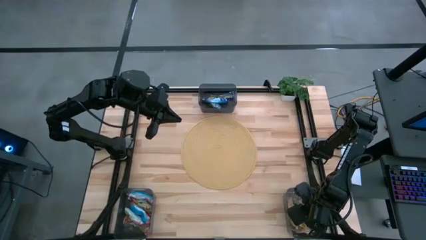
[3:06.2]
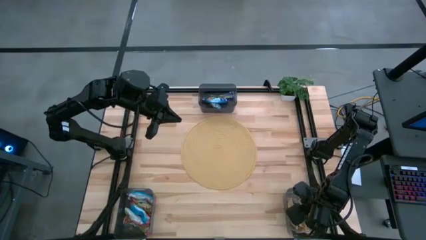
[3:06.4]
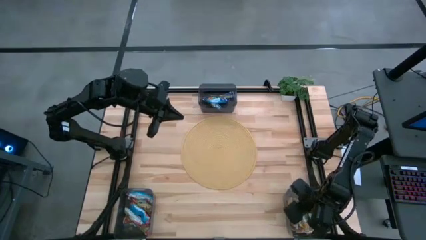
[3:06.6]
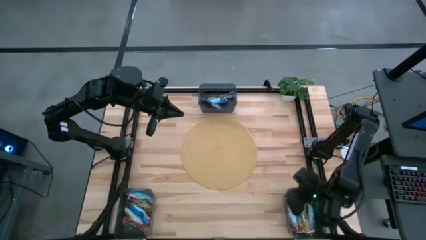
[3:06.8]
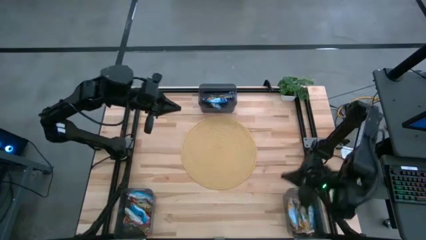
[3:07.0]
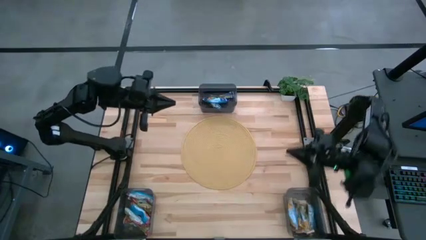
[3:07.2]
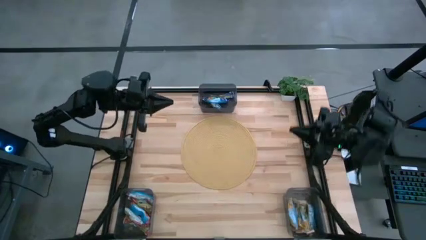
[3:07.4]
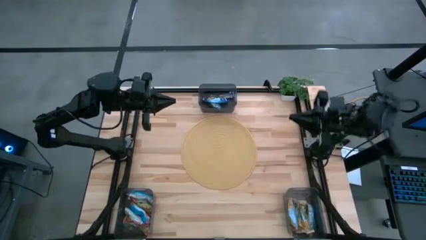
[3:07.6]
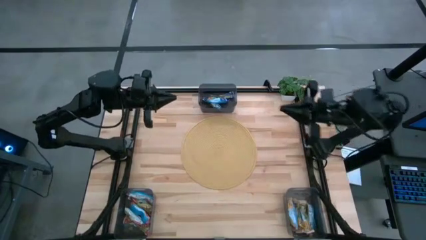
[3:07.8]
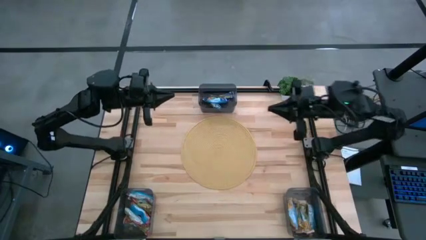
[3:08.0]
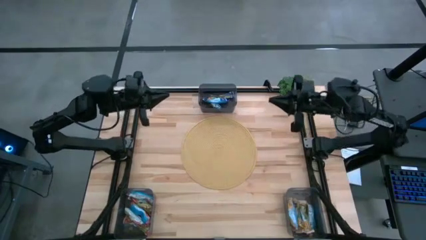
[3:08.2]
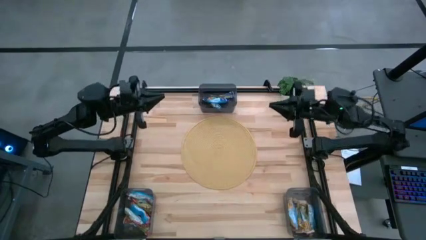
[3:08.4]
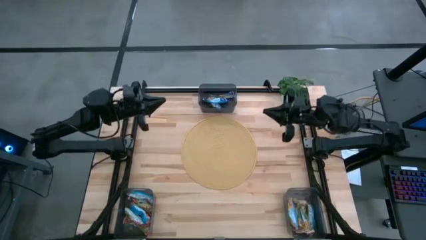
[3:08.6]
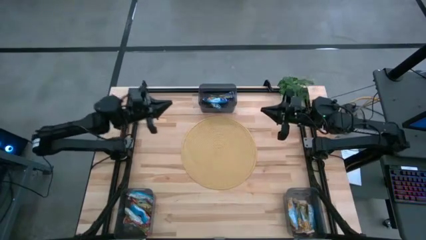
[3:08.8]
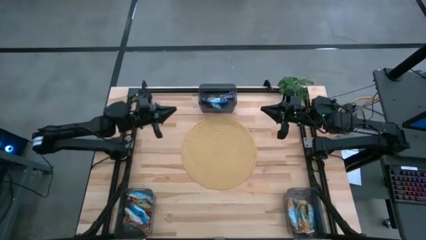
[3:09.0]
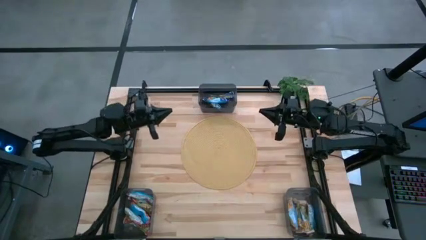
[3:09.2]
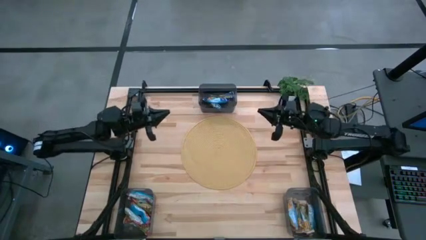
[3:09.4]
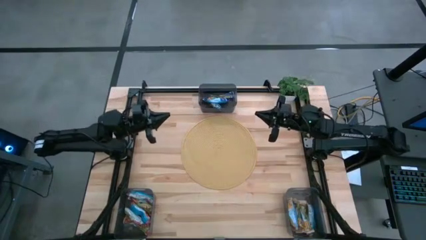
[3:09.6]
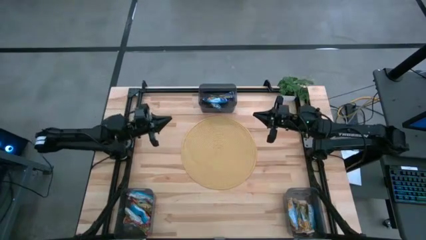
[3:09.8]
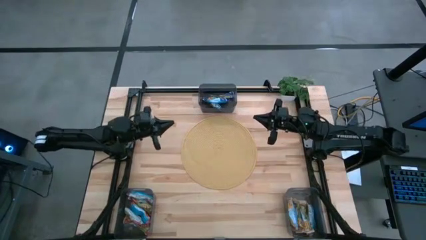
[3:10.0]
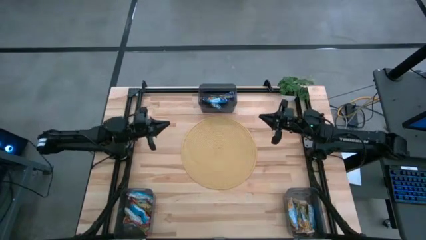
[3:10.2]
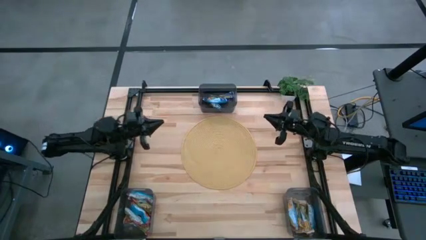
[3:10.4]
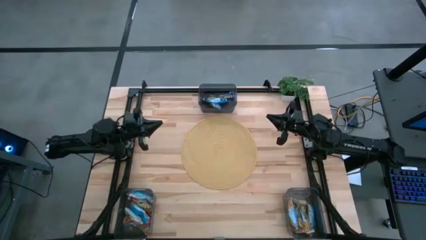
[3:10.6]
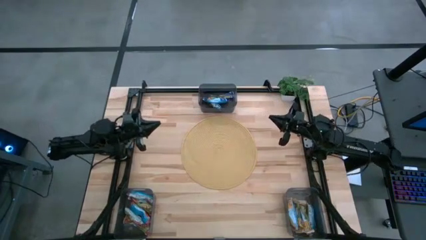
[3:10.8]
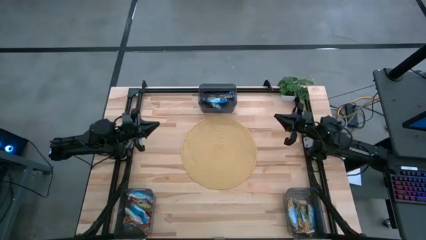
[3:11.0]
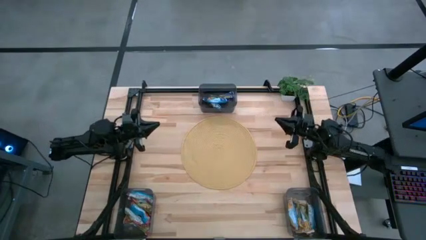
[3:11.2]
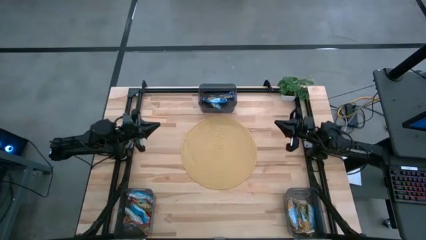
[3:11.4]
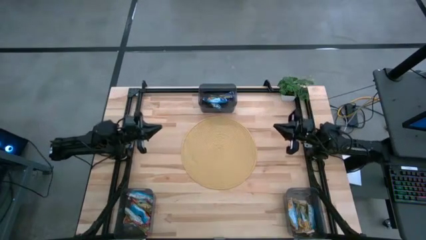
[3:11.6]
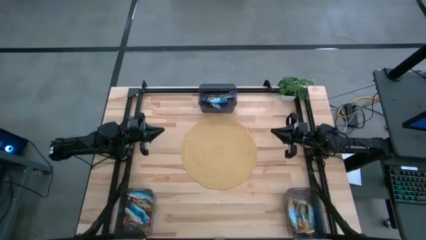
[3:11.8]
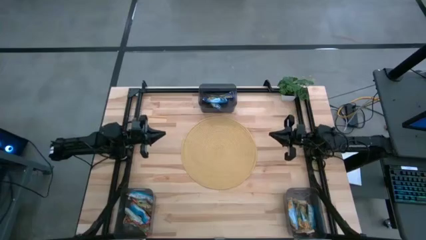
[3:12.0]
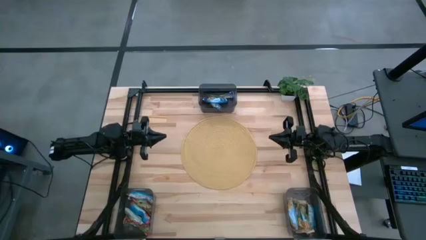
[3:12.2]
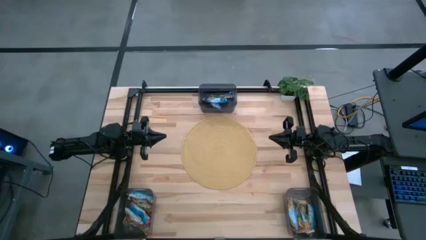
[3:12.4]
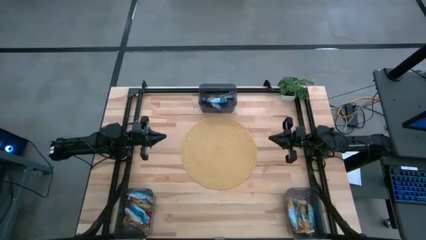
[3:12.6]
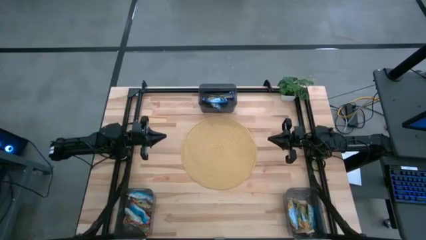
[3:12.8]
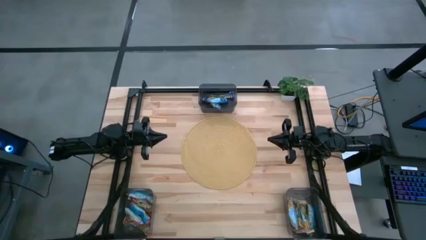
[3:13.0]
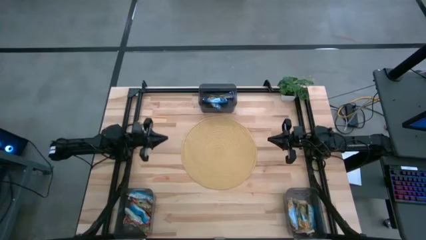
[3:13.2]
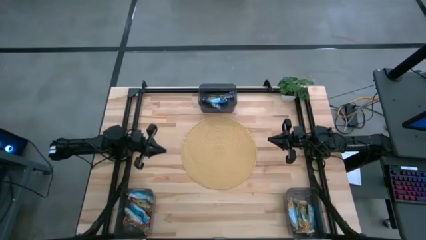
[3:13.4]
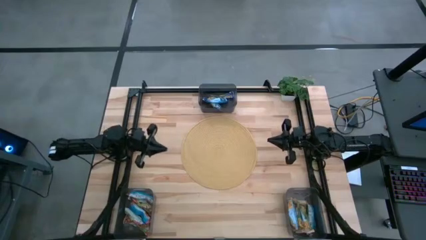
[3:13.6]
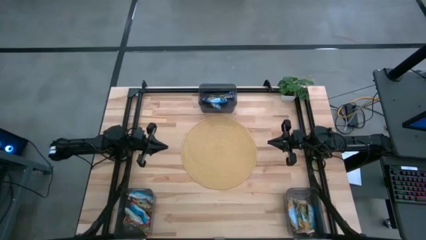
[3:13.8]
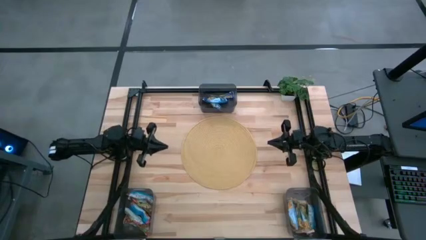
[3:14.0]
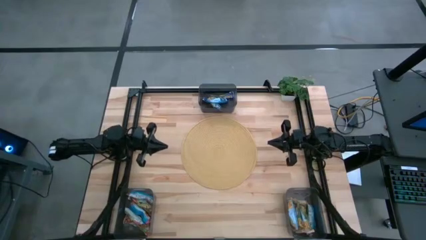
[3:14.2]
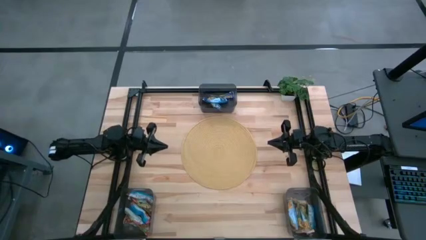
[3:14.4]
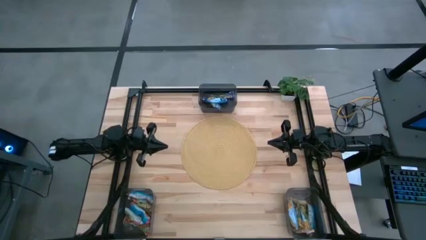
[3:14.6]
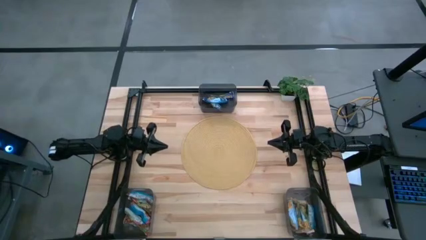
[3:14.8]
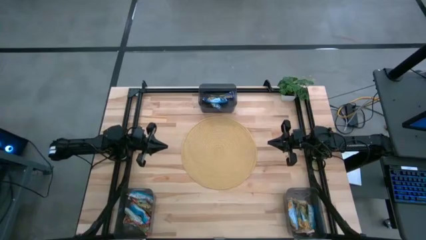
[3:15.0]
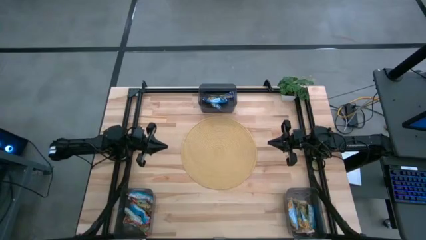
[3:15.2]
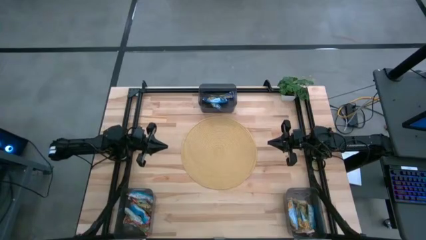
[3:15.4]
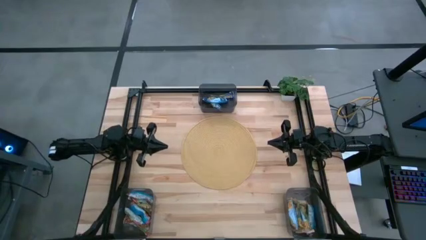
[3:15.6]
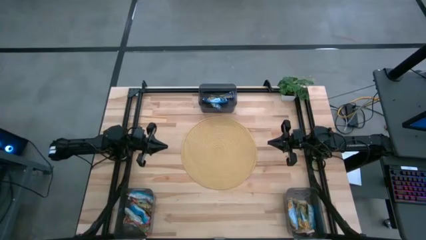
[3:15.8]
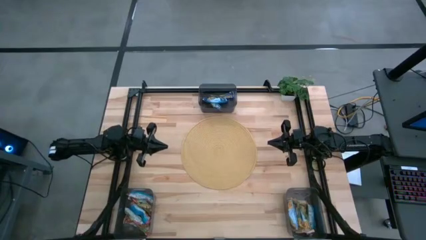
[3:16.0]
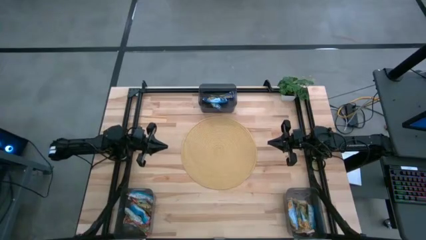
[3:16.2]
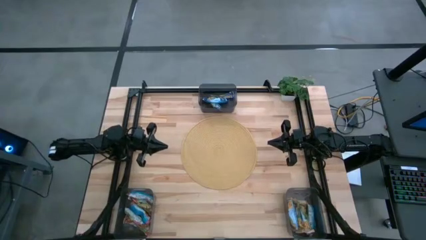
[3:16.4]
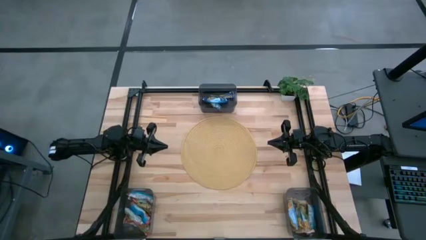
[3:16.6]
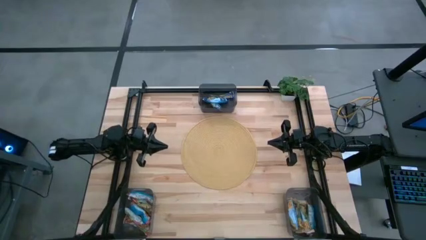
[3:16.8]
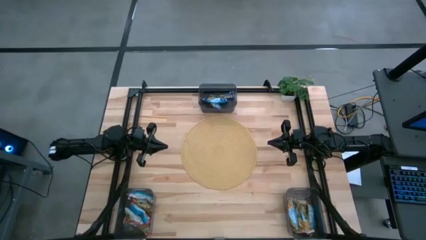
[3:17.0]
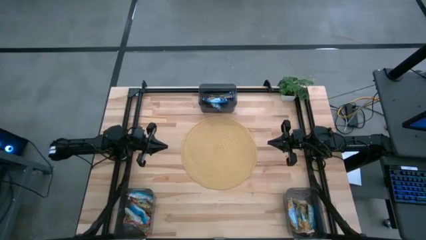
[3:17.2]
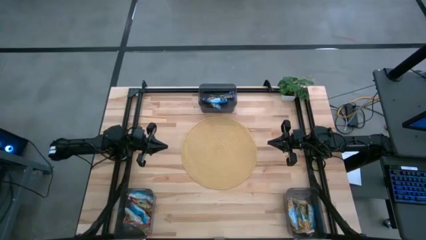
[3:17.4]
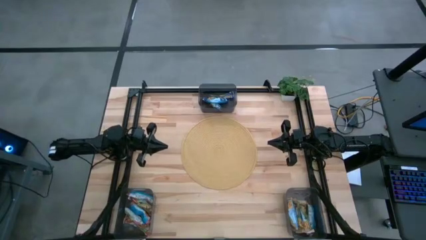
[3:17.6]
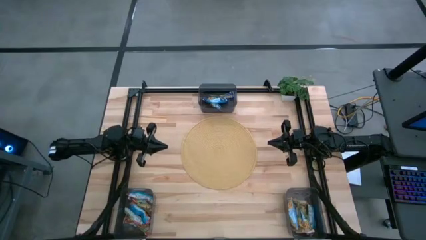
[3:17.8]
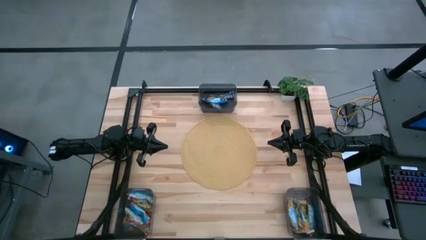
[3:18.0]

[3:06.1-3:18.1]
Task: Pick and place Granola Bars by type
Return to Home Position

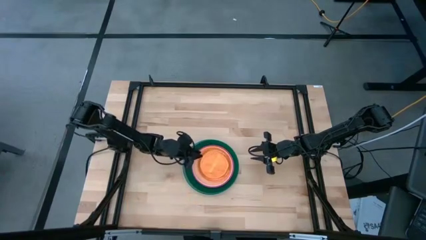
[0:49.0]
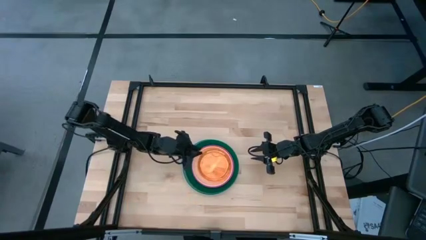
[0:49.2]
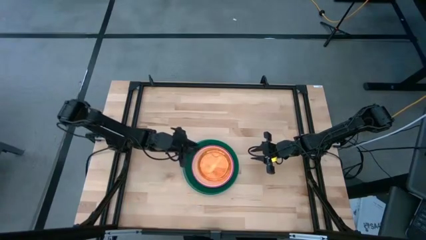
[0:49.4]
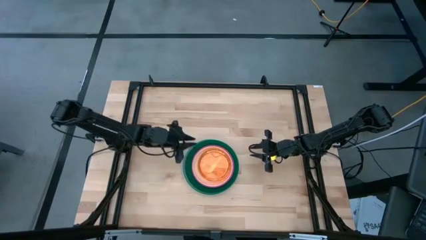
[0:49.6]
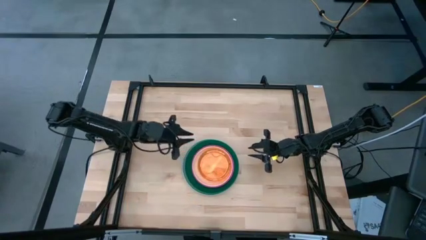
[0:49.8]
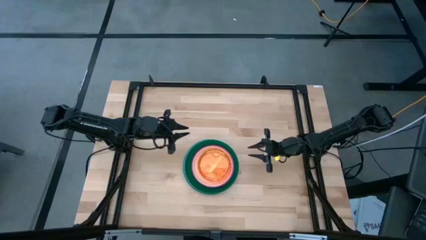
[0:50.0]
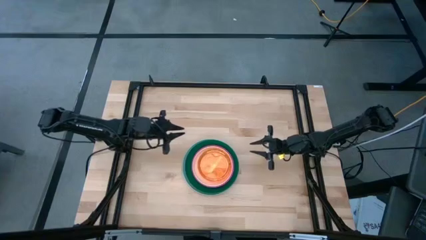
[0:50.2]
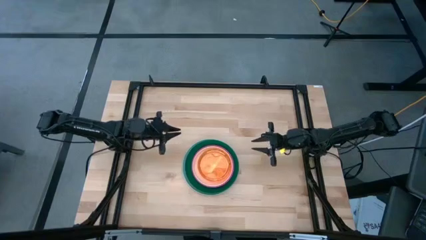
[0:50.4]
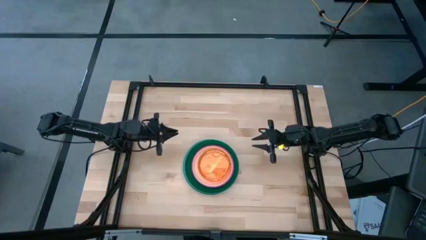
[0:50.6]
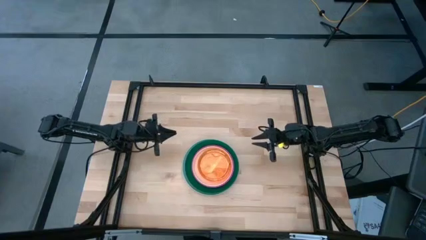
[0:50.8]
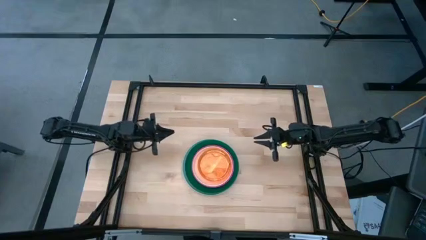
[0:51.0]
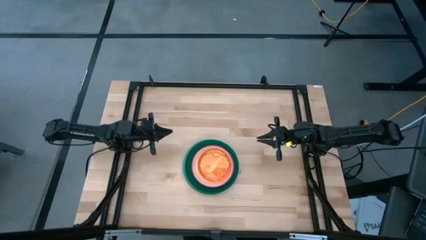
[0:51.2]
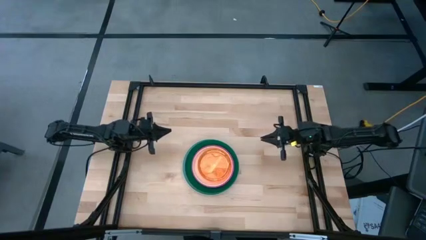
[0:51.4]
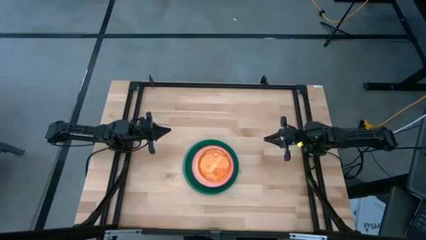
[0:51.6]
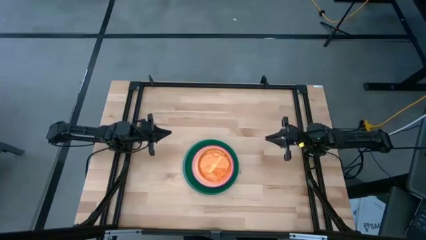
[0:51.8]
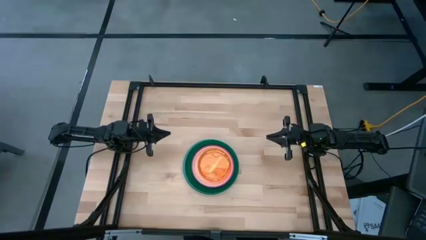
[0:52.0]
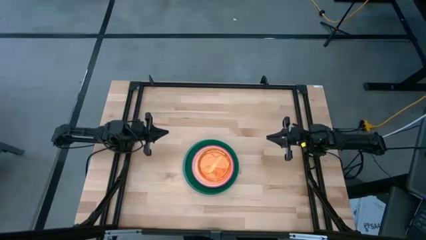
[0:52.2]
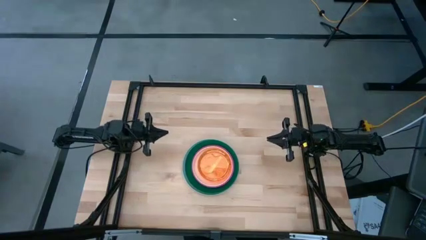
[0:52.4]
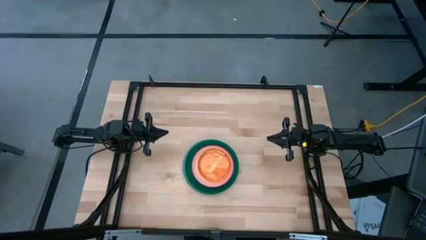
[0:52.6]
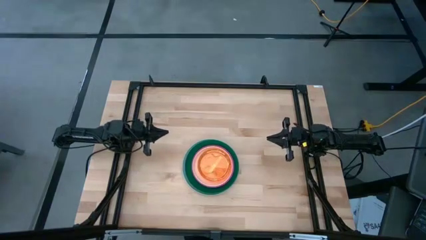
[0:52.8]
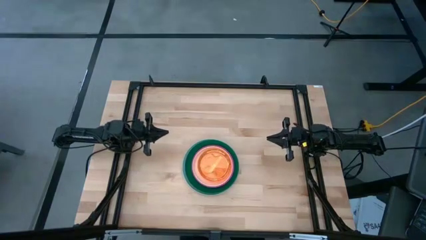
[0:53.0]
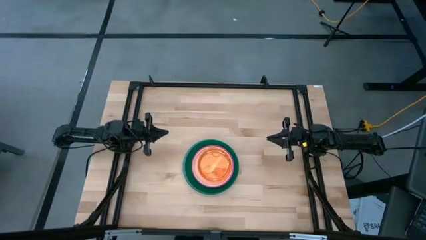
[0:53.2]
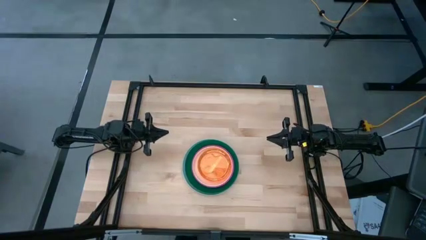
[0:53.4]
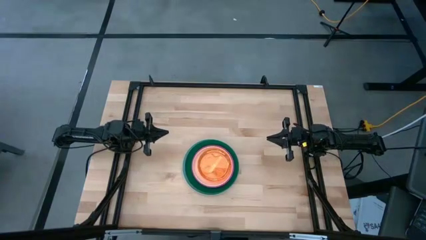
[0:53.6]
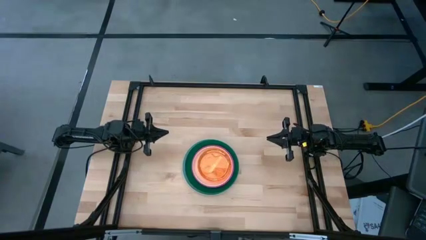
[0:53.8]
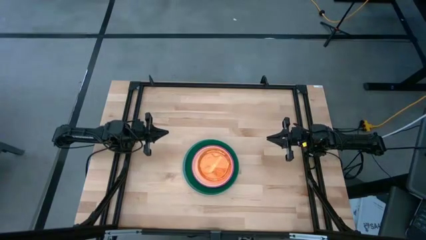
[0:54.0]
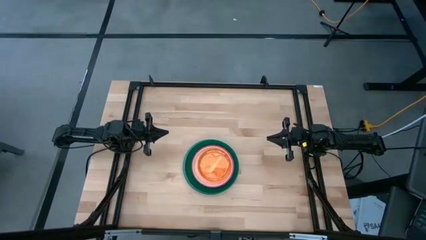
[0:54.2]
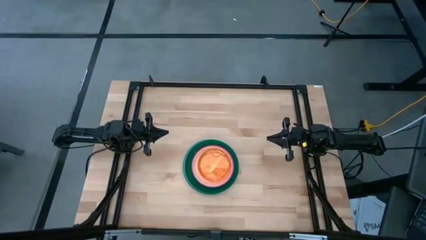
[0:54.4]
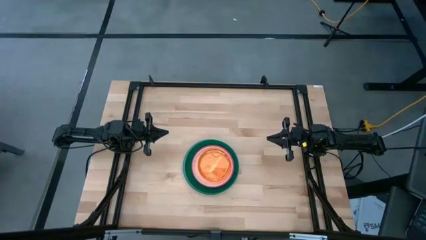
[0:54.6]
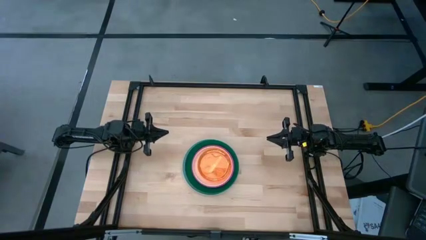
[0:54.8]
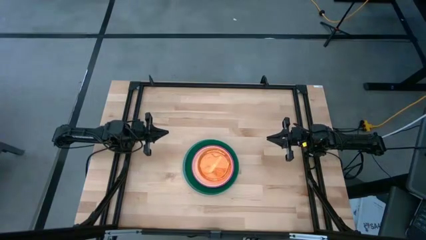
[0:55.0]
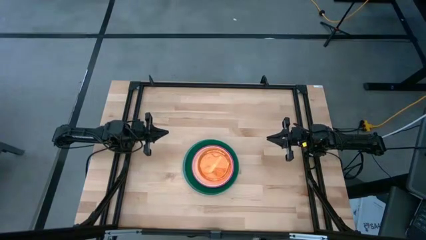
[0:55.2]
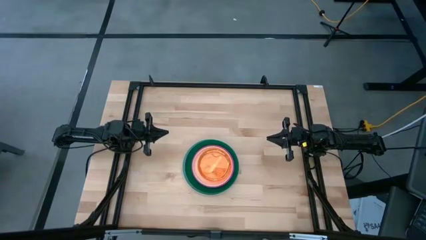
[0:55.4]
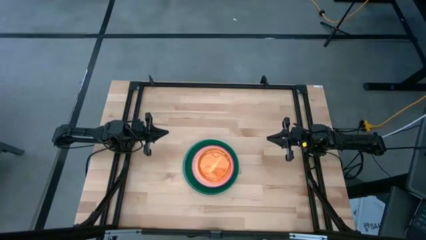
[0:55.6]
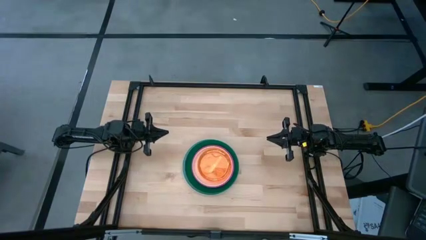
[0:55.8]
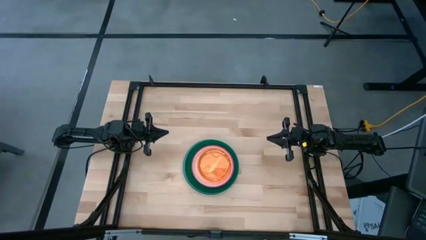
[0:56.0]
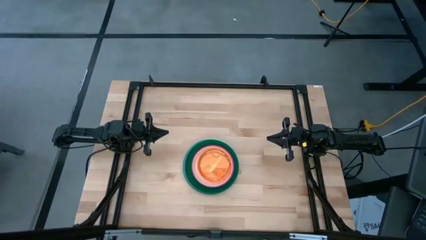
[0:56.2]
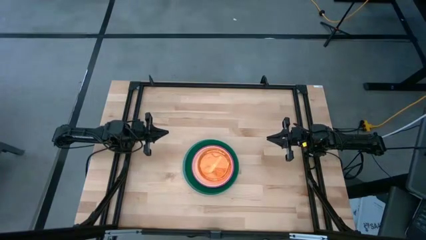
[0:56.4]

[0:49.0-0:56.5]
Task: Stack plastic plates
Return to Home Position
